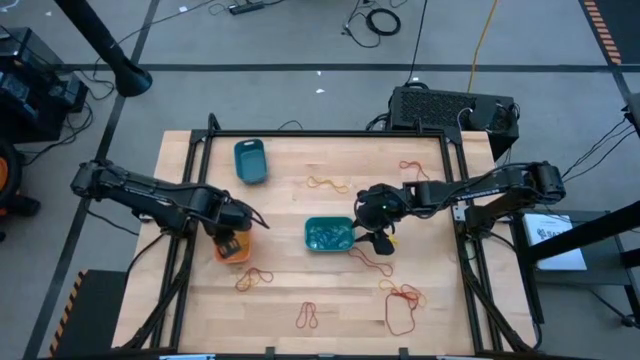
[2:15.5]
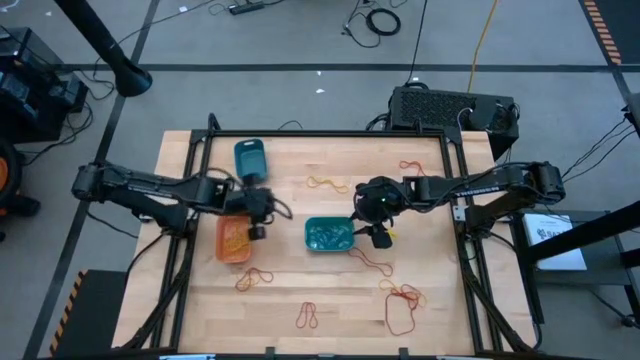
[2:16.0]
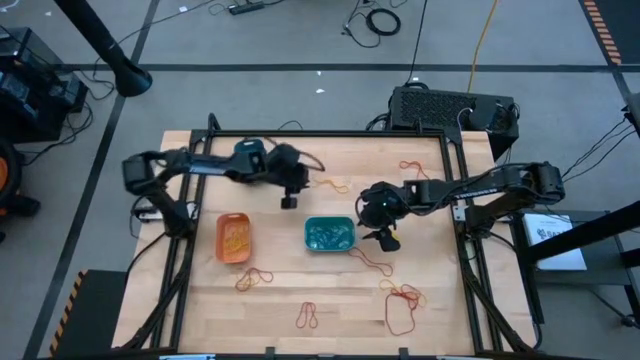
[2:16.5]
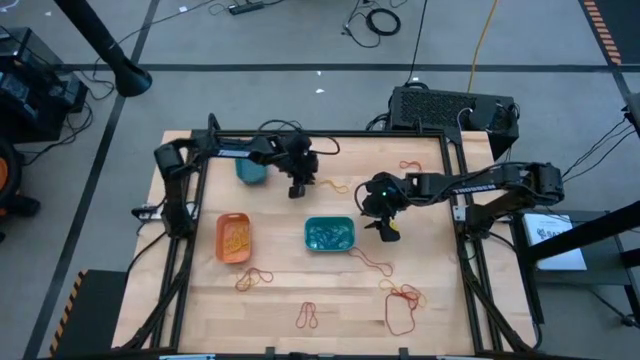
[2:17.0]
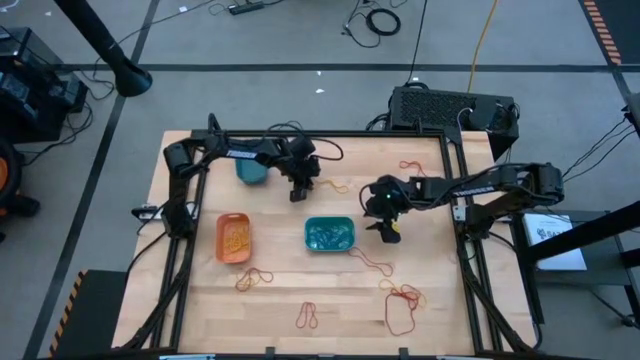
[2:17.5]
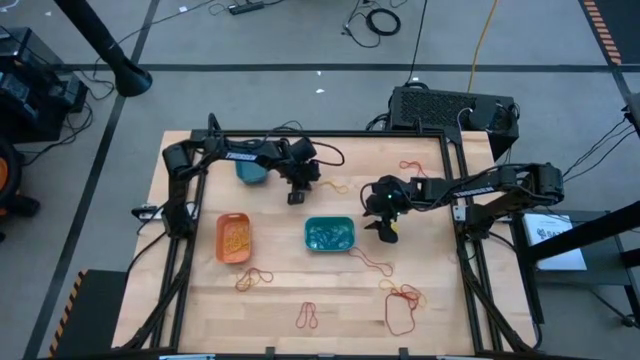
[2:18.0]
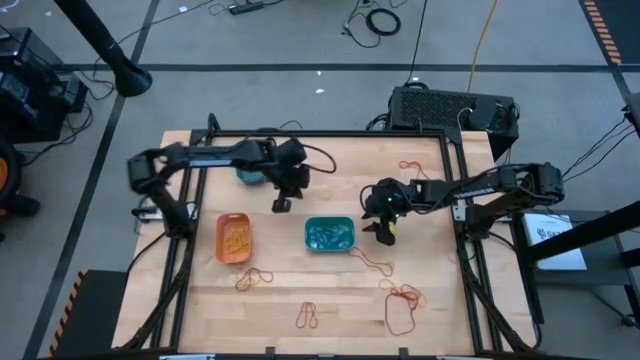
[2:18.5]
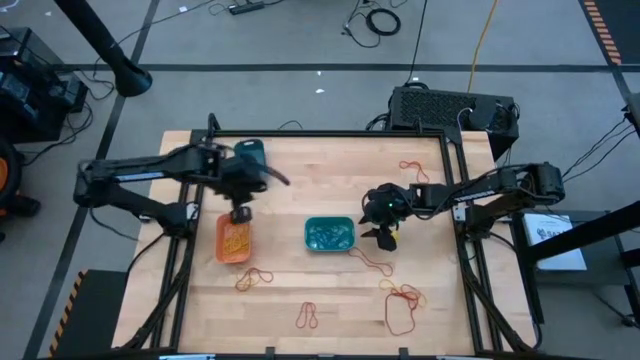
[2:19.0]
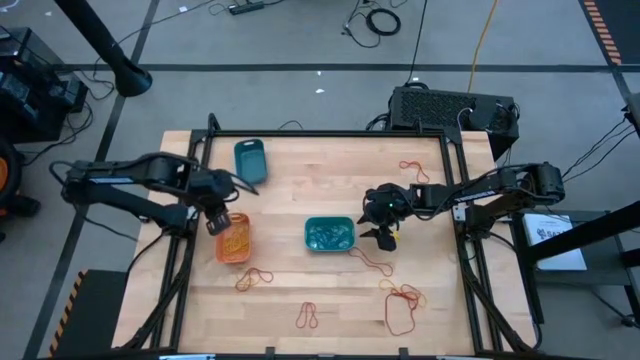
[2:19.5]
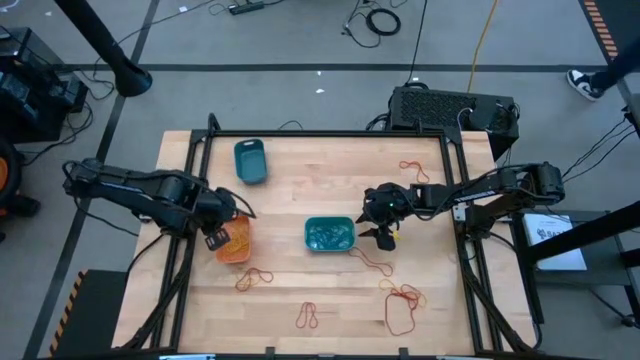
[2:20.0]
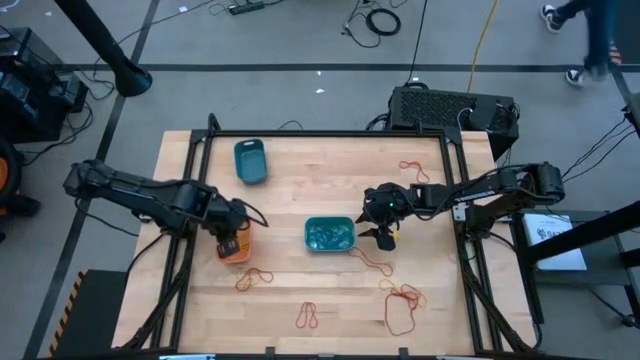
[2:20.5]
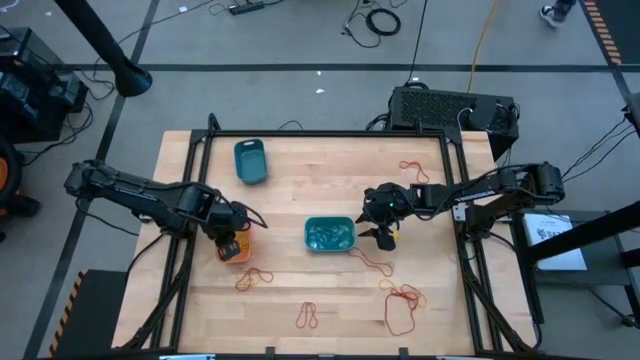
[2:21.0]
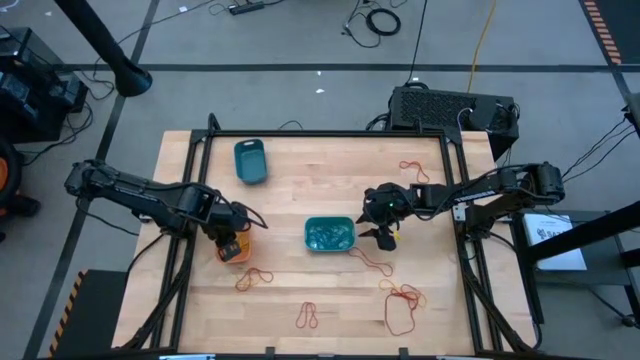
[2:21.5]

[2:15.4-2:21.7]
Task: Sort rubber bands into baskets
Put the yellow rubber band into the orange bin

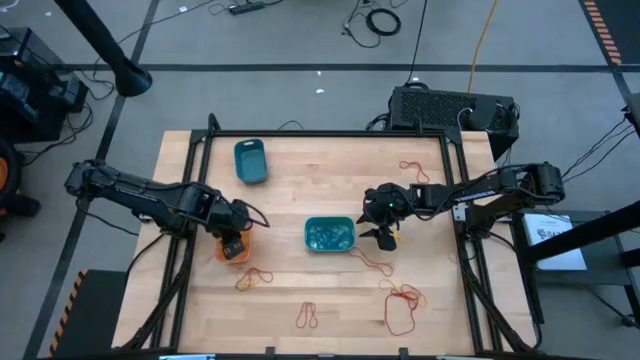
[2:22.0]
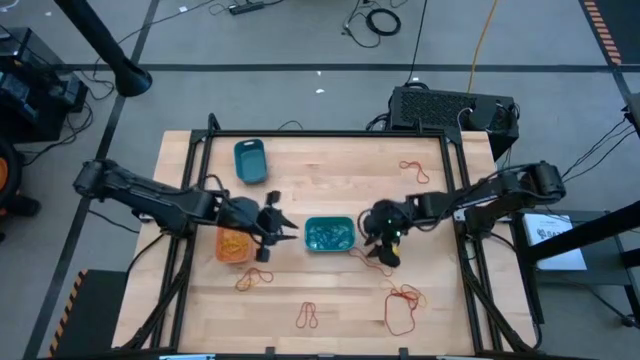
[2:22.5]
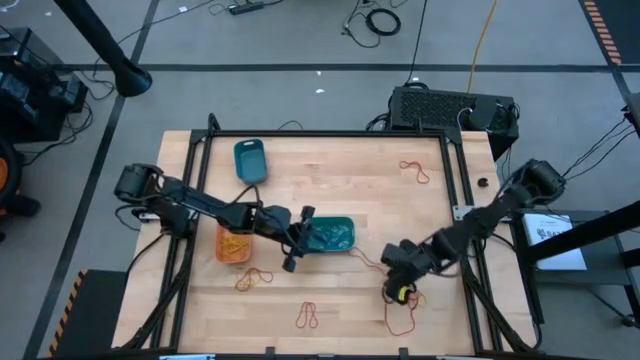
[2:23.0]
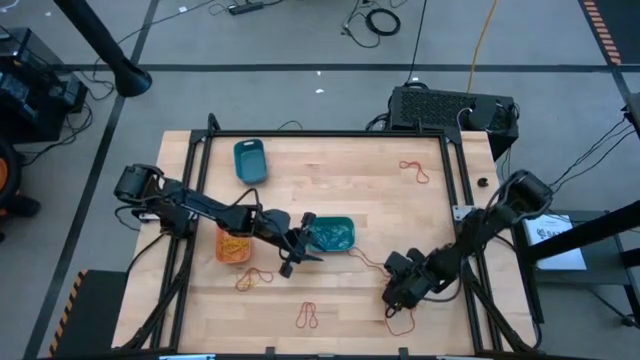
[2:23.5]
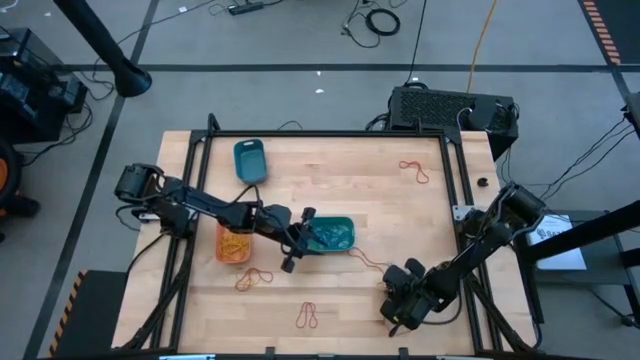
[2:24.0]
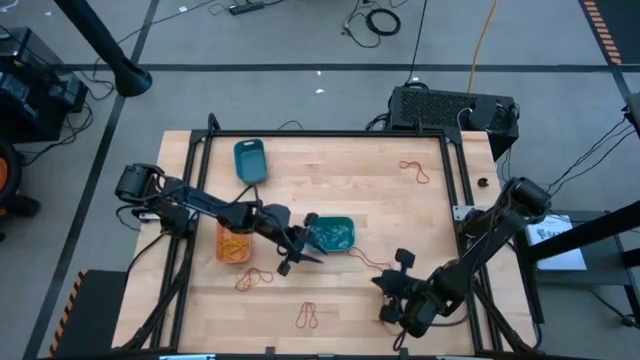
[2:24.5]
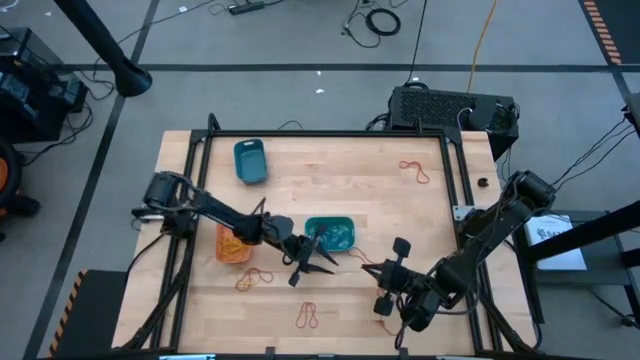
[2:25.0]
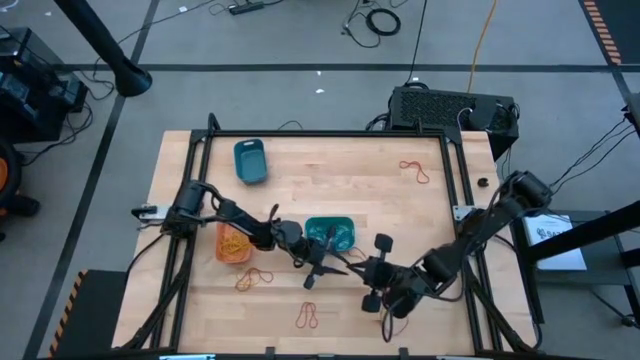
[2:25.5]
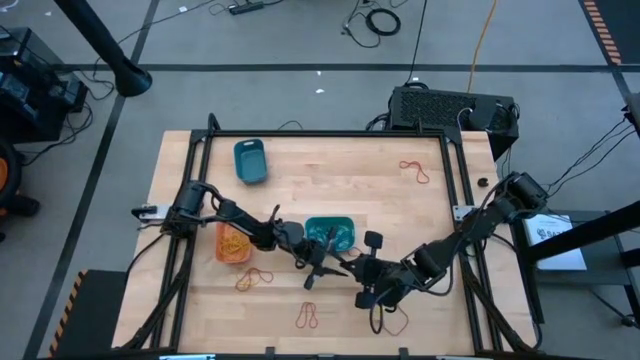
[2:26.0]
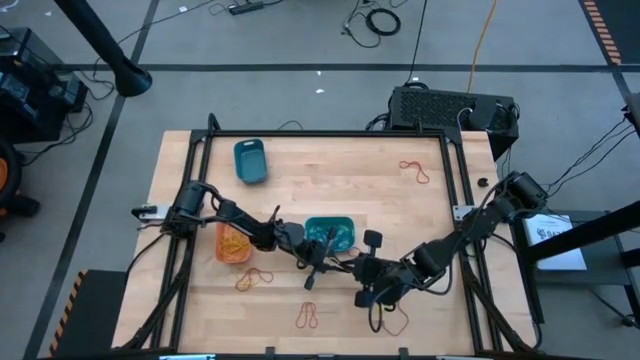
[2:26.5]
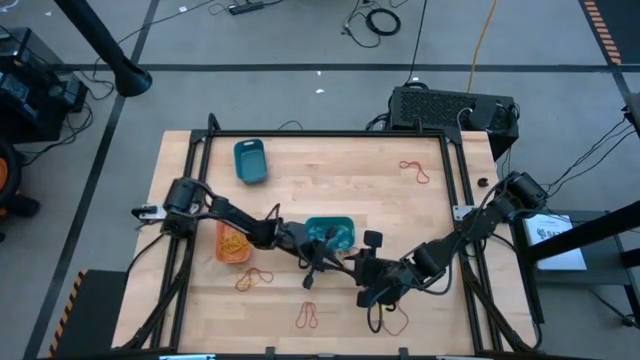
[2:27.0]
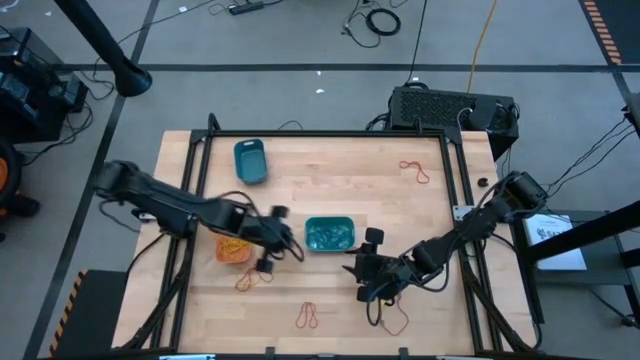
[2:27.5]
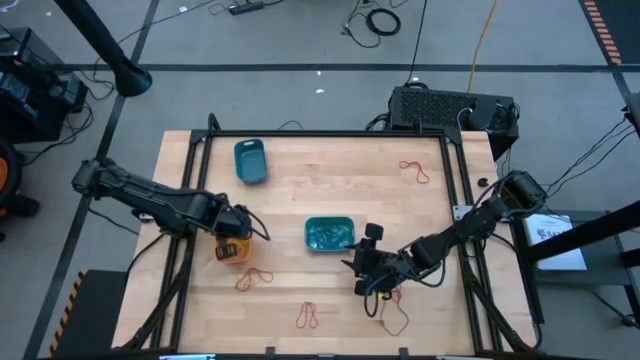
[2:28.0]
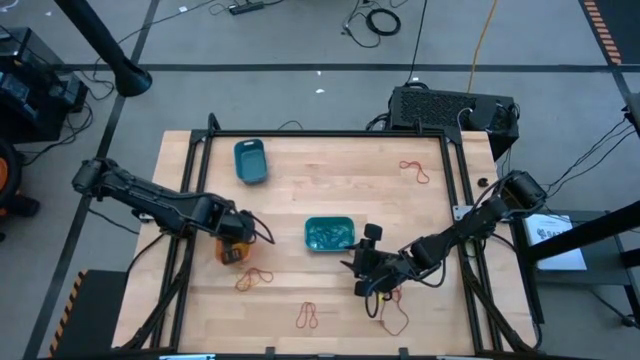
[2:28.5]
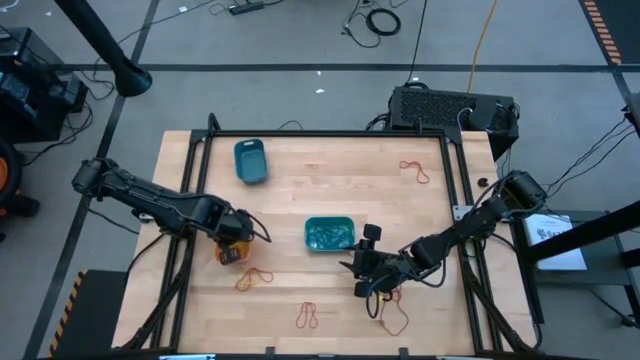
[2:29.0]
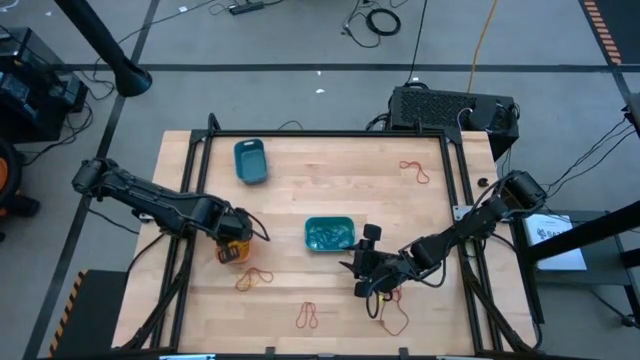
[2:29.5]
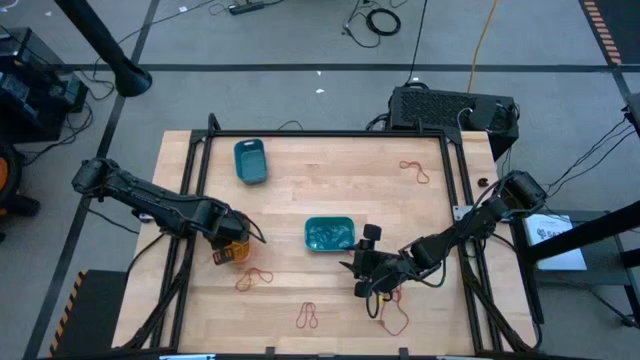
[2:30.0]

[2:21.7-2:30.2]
Put the yellow rubber band into the orange bin

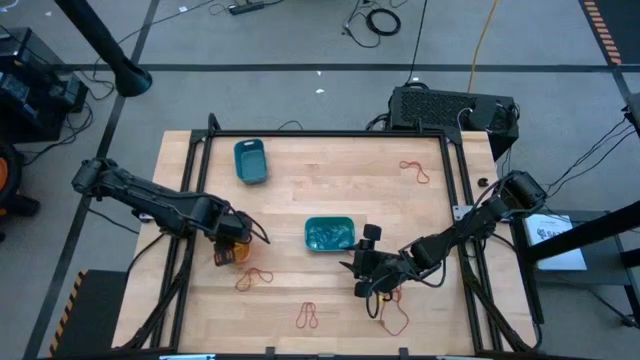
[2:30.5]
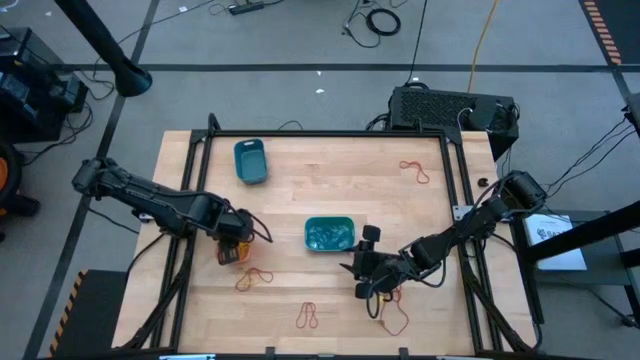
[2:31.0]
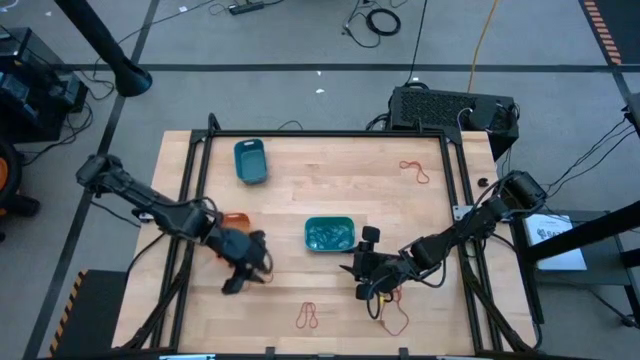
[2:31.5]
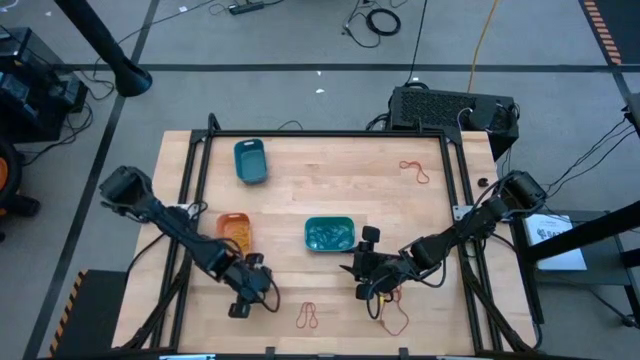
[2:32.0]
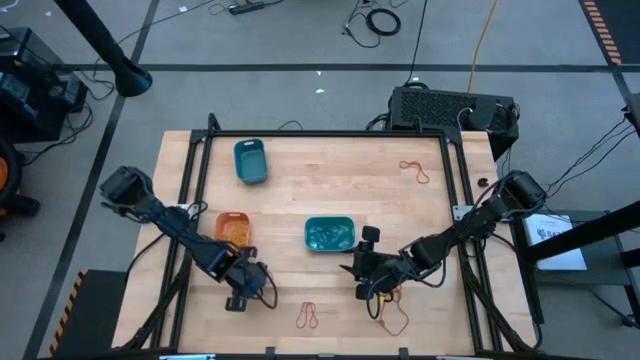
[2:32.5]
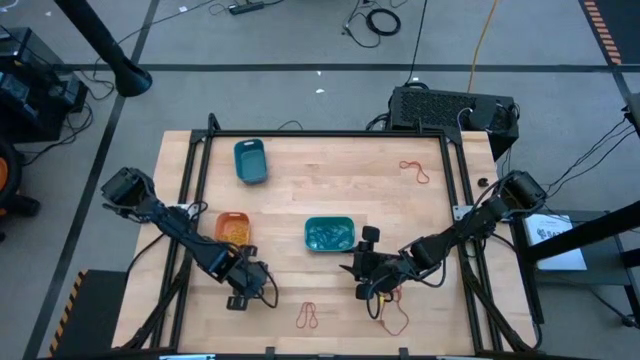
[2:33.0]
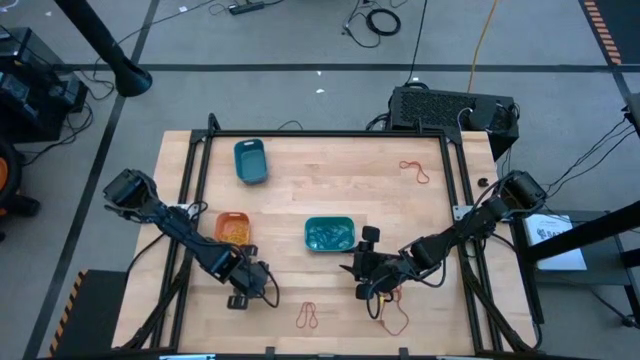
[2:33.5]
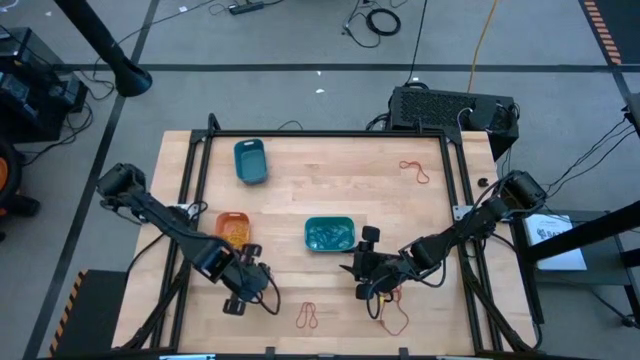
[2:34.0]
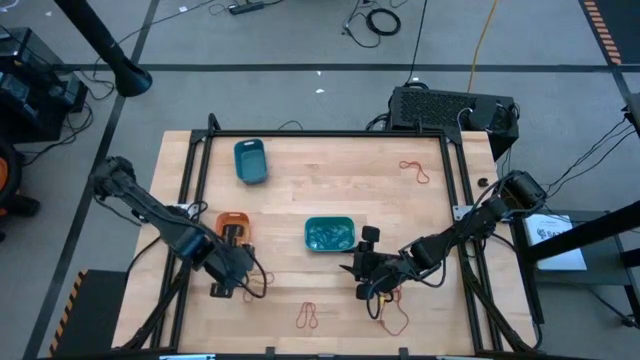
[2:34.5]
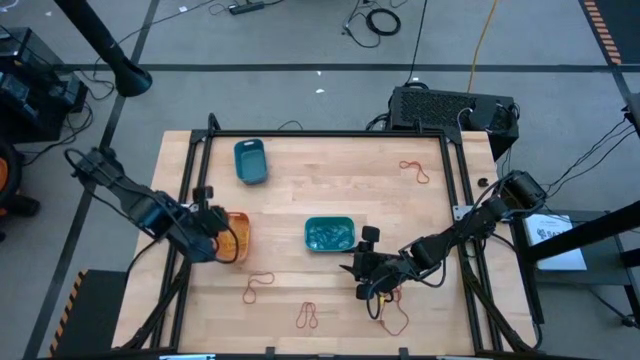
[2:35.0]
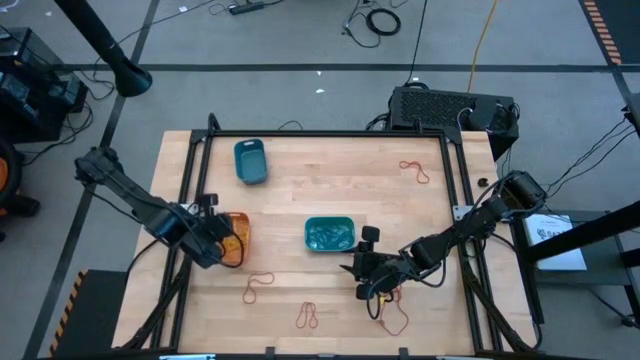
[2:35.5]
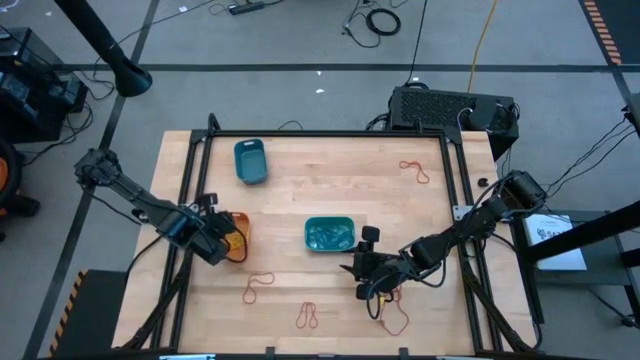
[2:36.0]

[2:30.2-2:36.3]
Put the yellow rubber band into the orange bin
